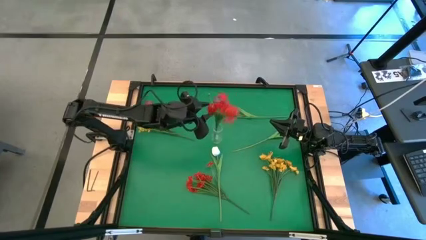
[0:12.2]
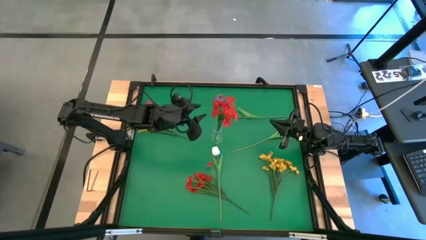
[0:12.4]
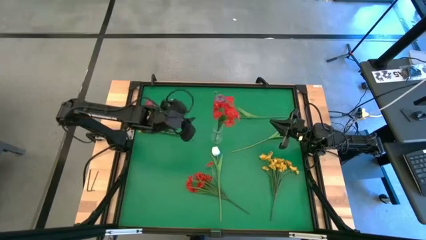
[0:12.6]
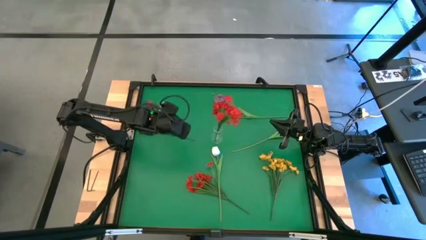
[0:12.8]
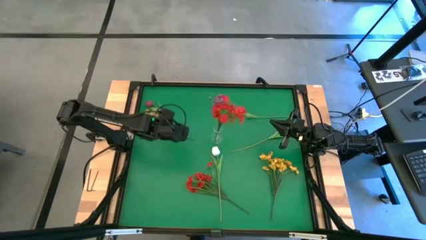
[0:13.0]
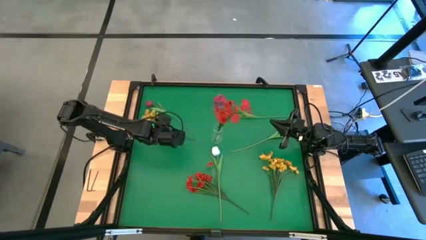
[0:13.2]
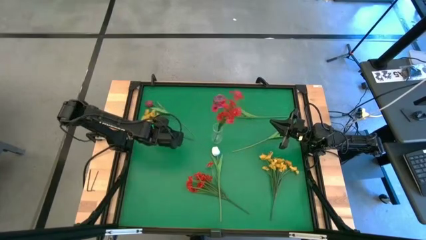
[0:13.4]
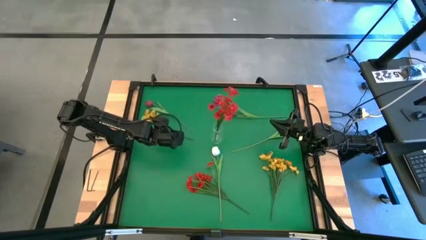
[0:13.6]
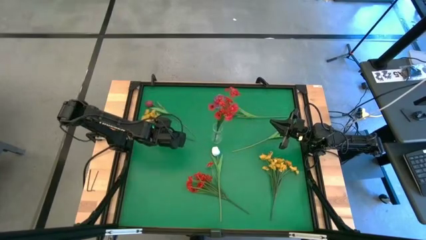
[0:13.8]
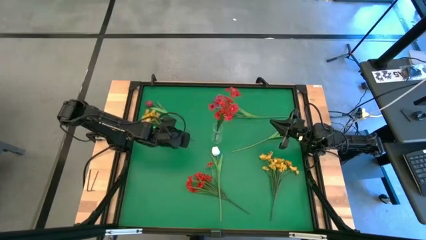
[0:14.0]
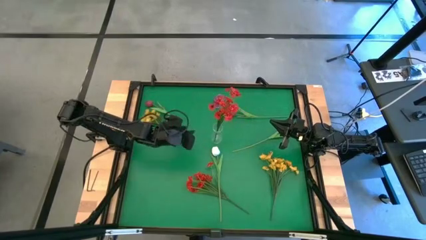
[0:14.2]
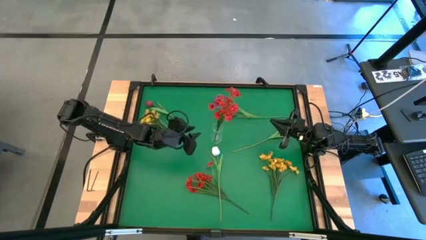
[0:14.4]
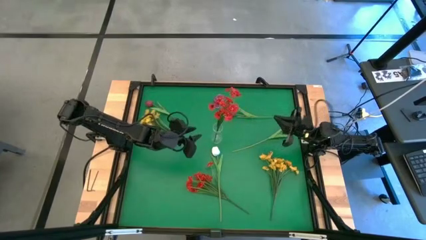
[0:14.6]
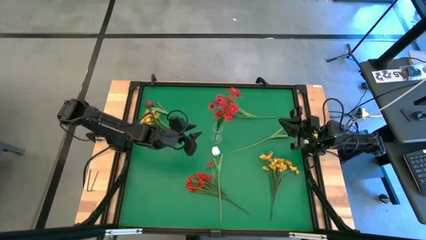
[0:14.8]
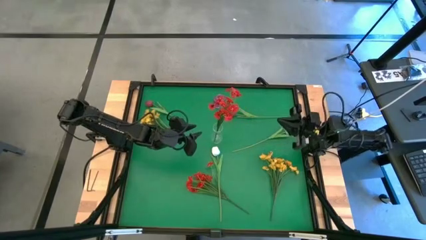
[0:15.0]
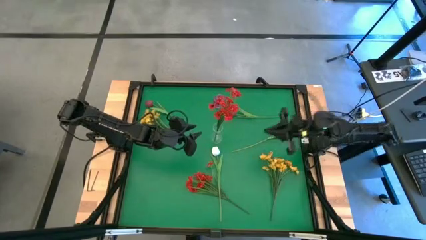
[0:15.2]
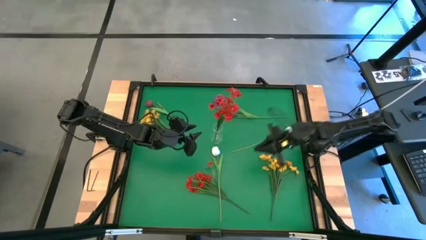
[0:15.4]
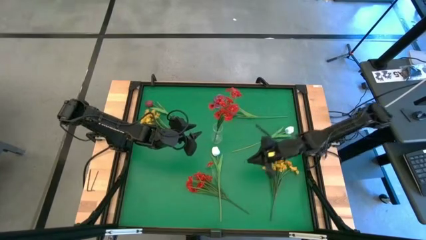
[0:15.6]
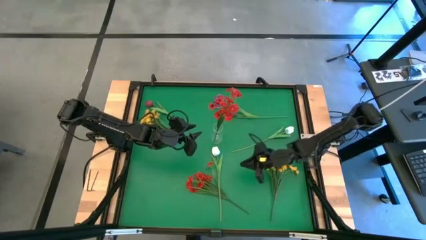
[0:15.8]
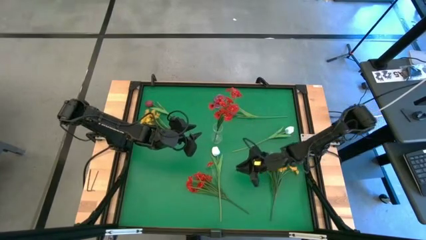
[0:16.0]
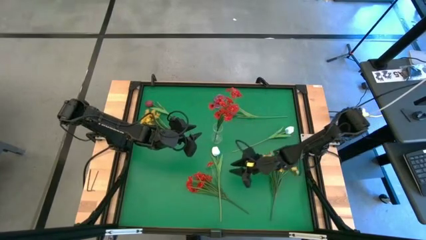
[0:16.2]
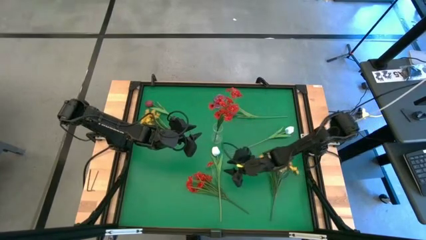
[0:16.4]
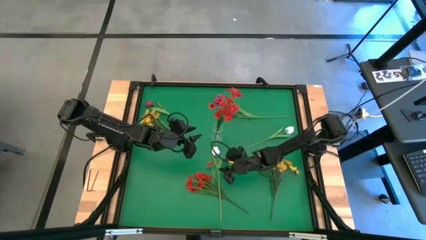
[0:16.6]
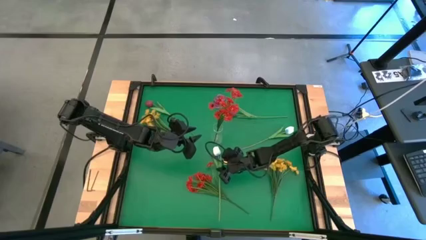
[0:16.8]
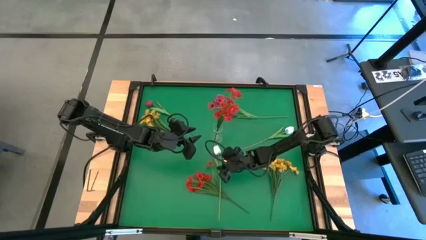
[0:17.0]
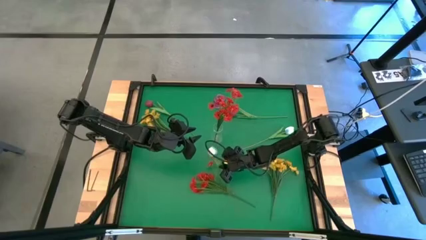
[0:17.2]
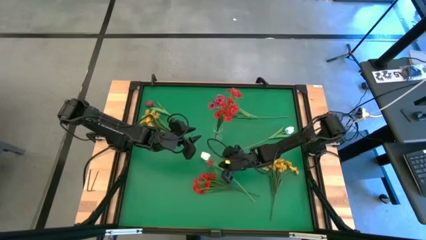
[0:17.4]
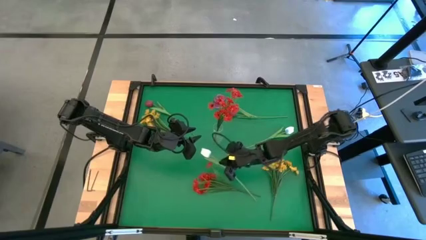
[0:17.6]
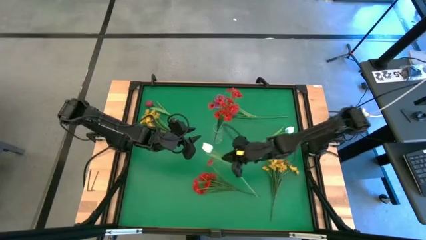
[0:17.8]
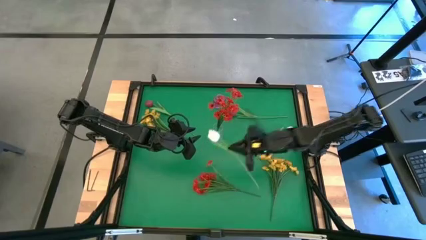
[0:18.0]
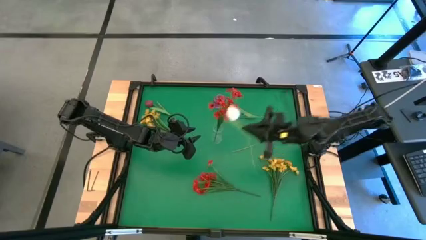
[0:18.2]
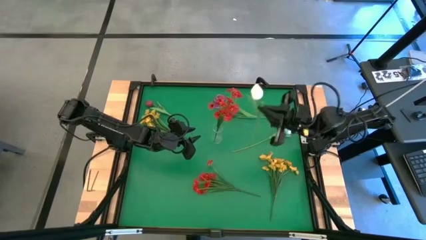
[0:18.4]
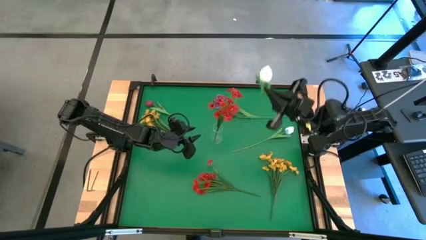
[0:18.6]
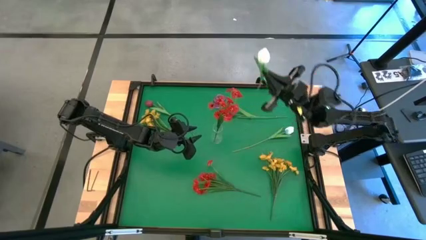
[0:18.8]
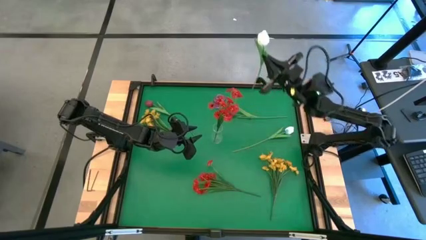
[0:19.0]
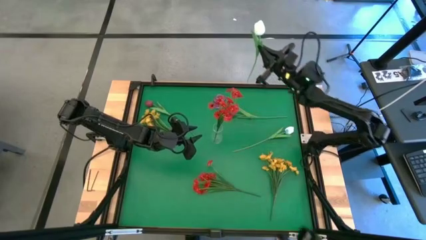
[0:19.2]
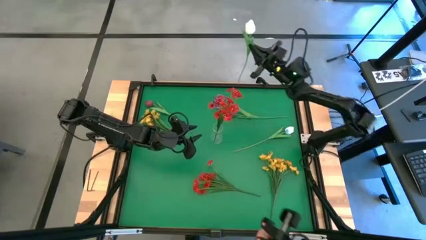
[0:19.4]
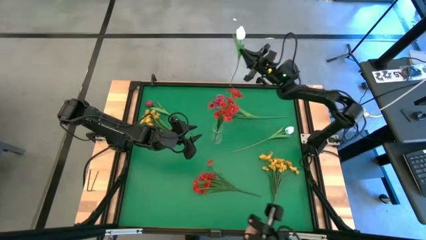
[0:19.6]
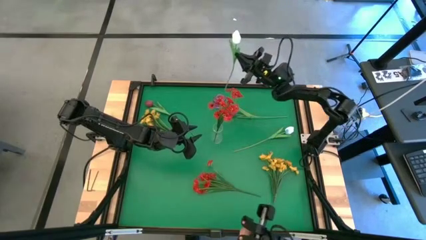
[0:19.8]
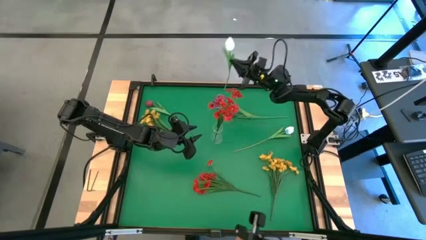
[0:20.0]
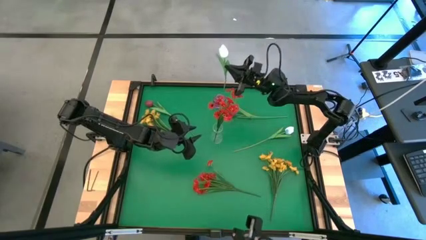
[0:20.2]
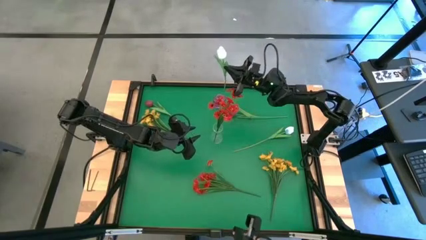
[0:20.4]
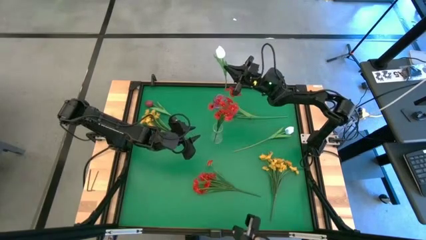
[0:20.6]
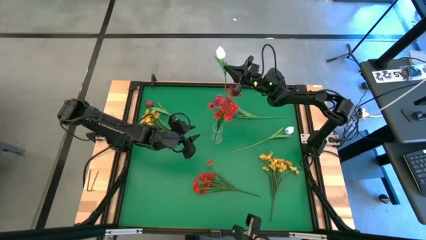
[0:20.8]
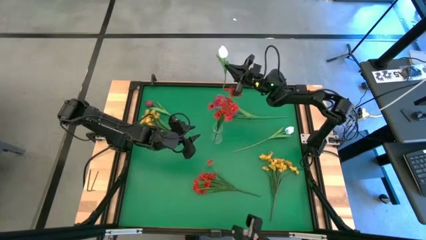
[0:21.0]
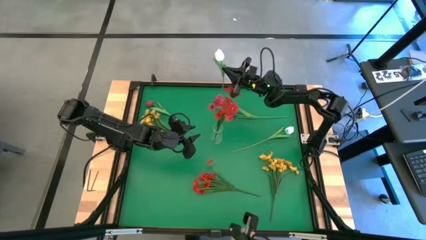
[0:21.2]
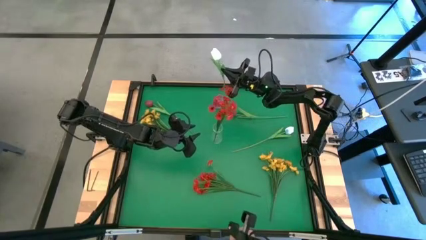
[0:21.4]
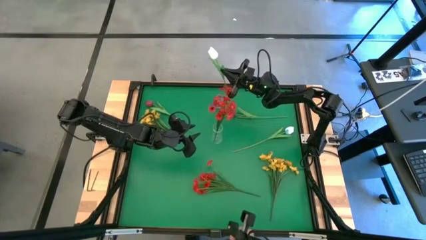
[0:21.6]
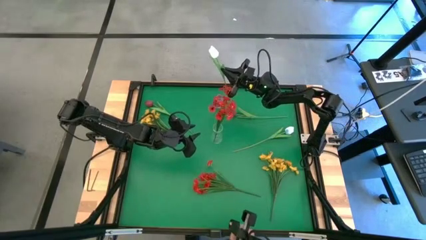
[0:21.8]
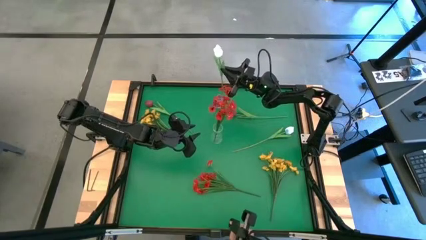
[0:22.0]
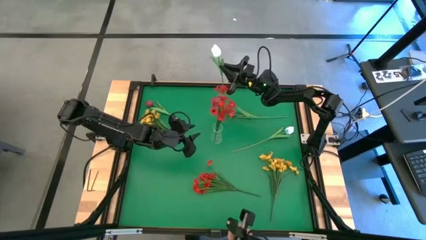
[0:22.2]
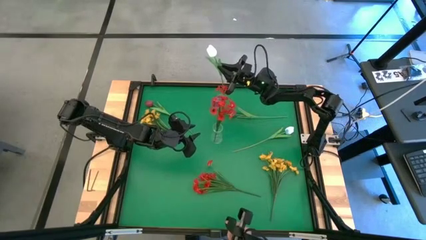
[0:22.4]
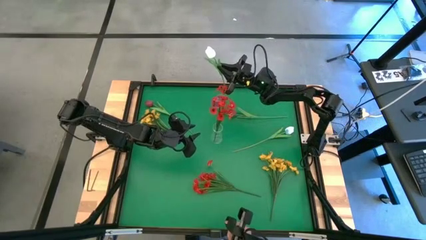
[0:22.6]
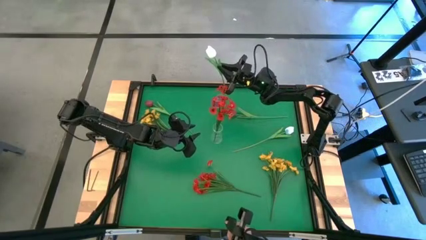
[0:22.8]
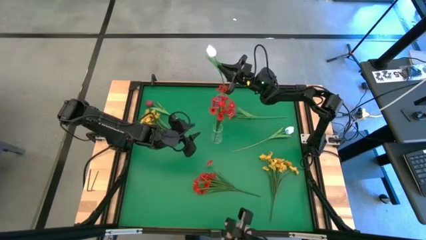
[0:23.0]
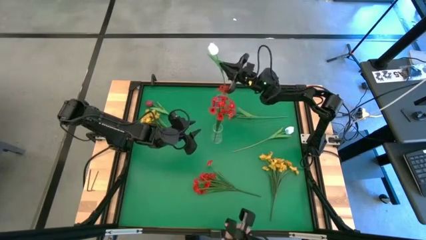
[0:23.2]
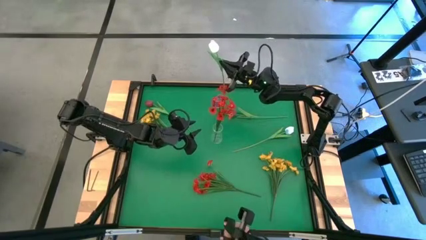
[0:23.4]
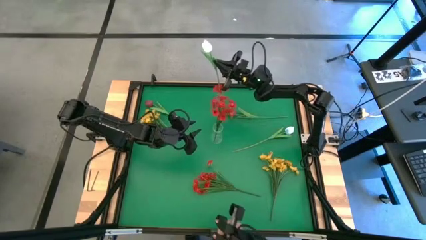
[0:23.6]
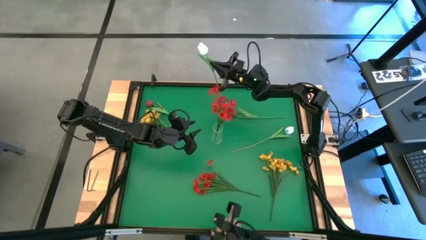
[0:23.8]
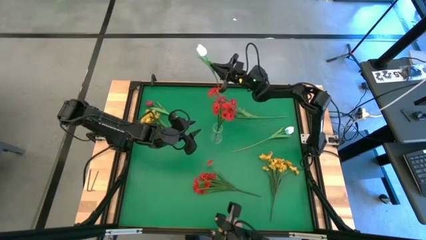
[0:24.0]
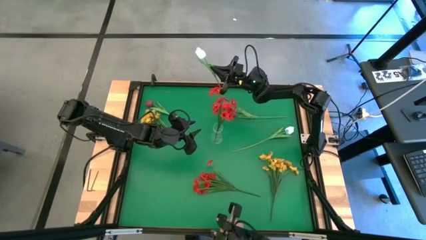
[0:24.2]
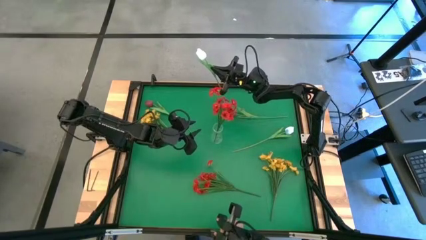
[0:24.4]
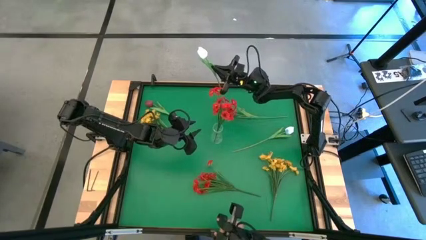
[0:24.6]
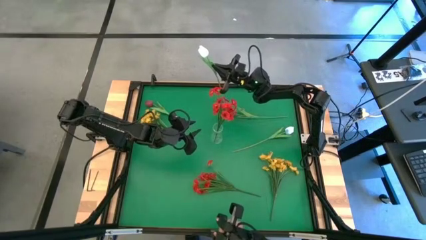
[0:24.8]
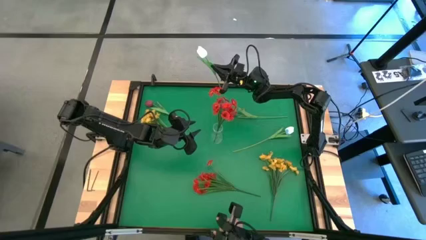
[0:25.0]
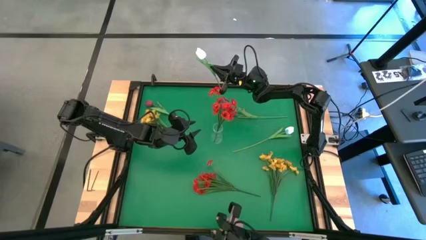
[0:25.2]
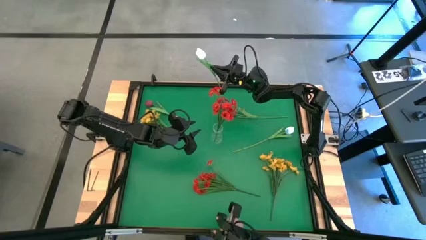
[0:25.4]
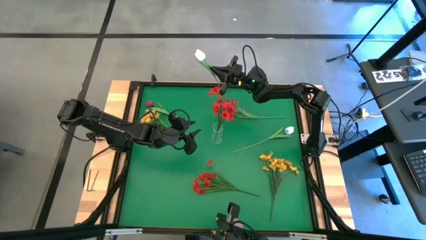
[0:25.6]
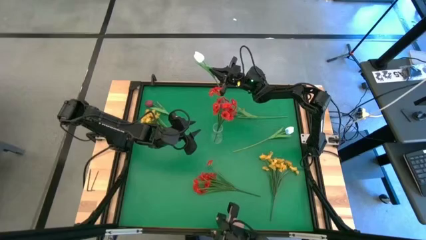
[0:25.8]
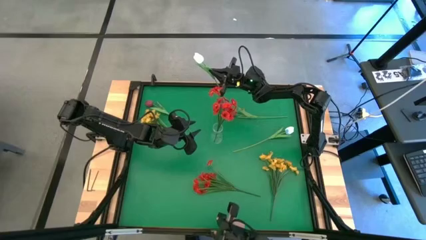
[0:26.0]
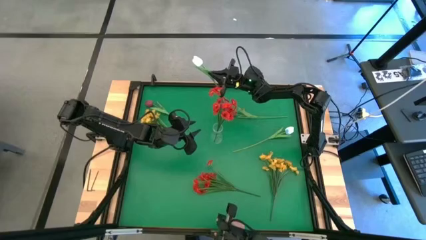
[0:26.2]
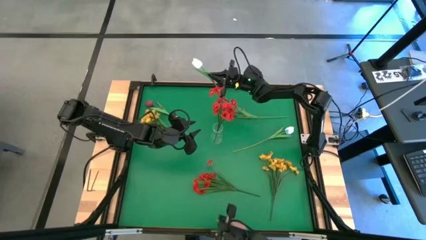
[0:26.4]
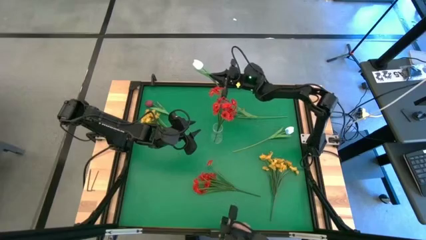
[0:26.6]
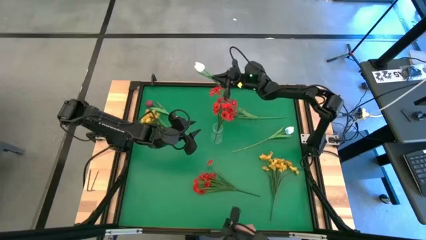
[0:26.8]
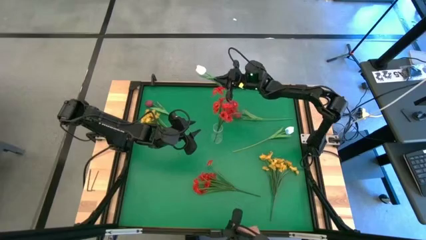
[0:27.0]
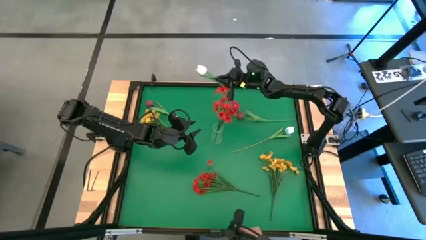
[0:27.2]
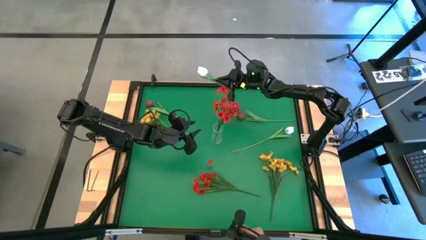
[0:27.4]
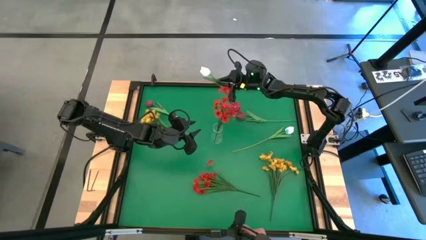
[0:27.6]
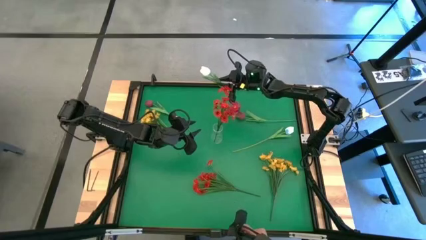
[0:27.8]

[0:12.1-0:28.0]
Task: Sort flowers into vase by color
Put the left white tulip into the purple vase
